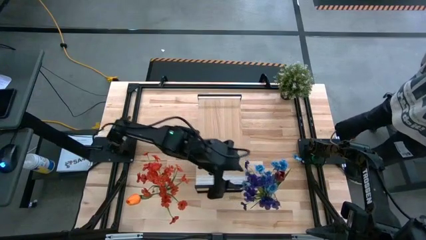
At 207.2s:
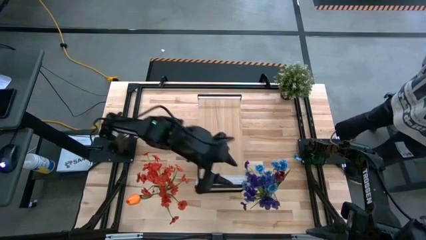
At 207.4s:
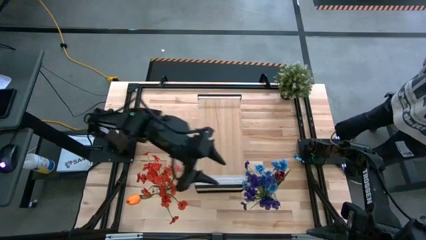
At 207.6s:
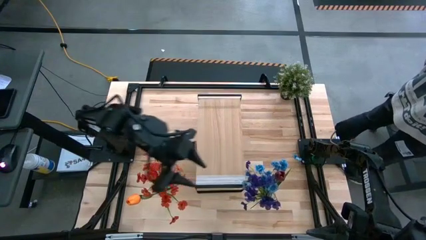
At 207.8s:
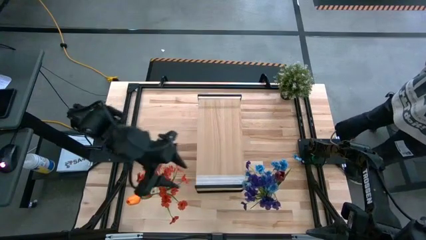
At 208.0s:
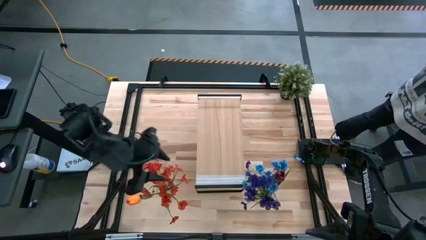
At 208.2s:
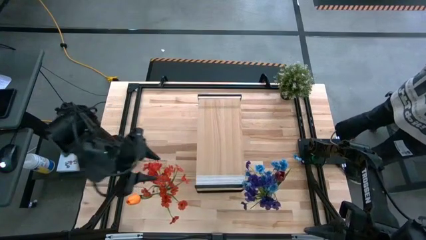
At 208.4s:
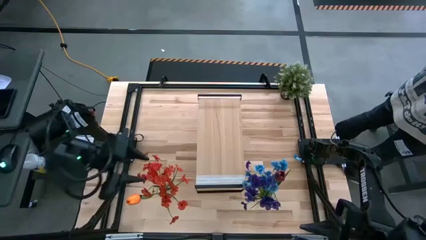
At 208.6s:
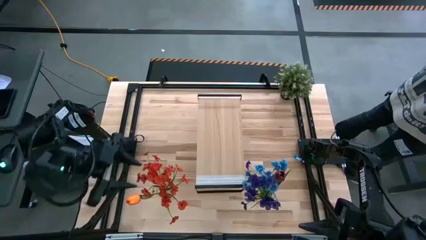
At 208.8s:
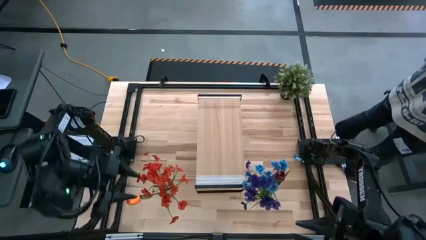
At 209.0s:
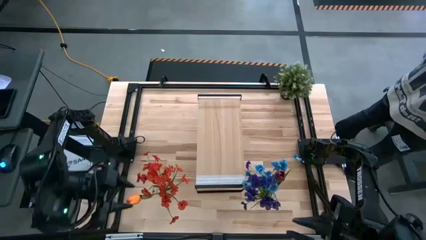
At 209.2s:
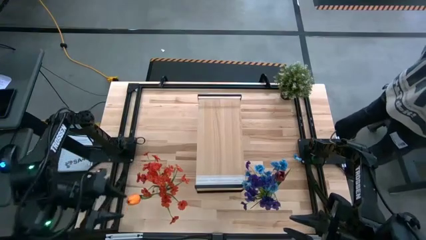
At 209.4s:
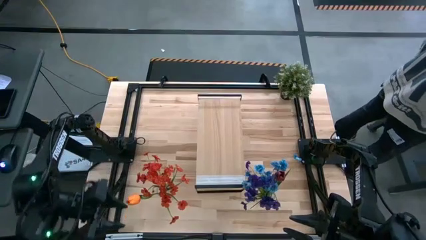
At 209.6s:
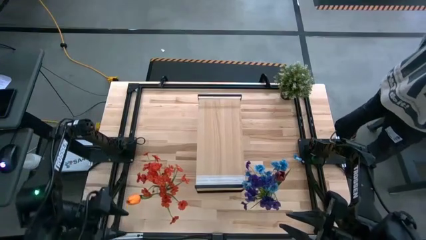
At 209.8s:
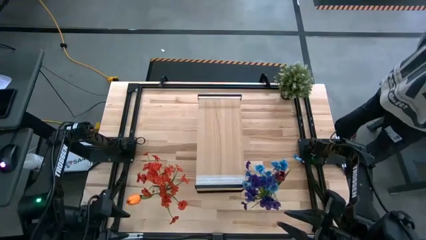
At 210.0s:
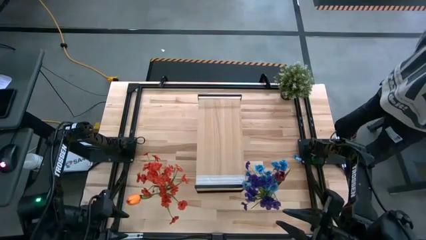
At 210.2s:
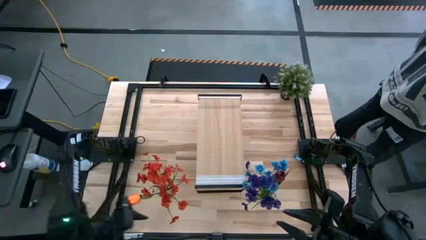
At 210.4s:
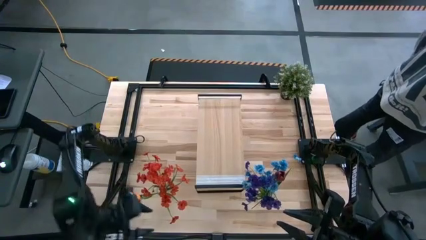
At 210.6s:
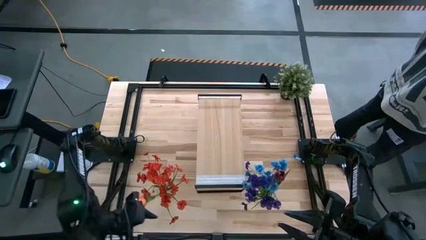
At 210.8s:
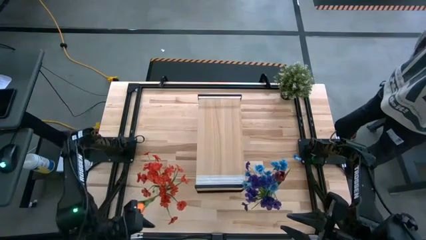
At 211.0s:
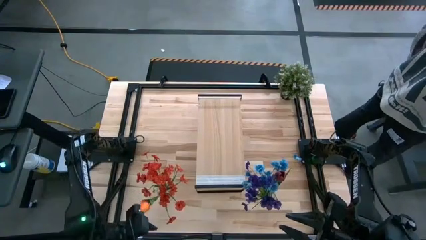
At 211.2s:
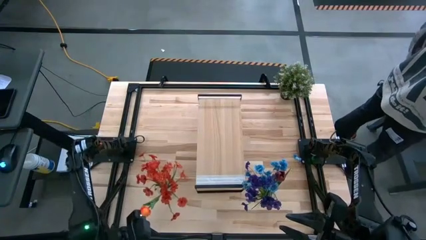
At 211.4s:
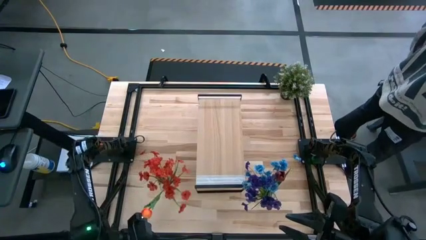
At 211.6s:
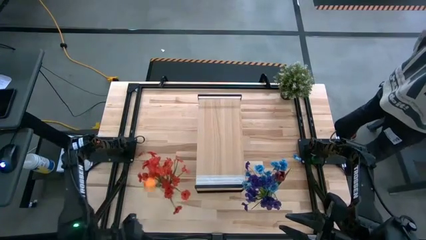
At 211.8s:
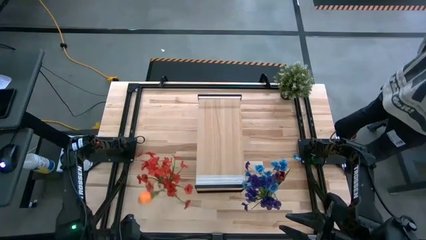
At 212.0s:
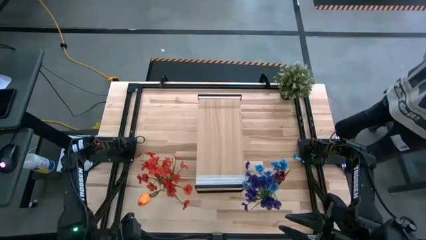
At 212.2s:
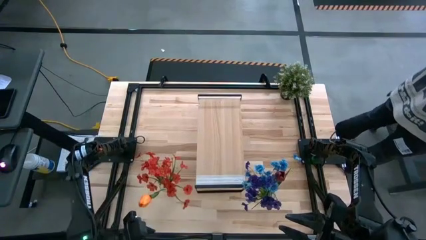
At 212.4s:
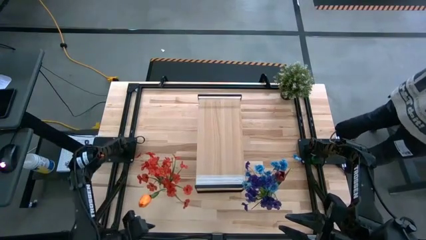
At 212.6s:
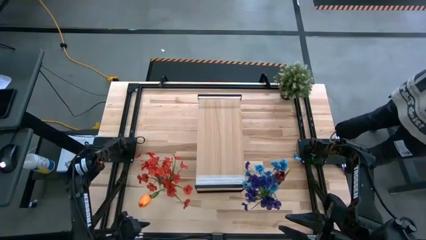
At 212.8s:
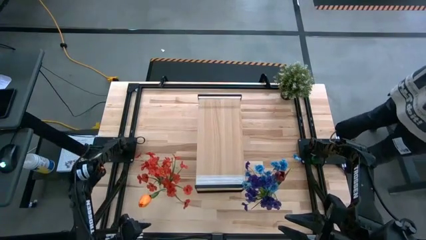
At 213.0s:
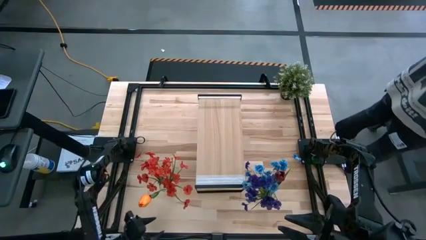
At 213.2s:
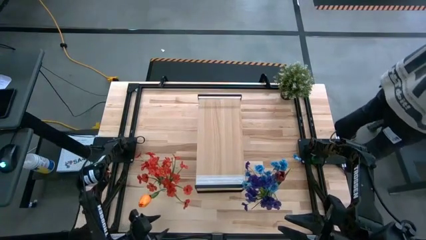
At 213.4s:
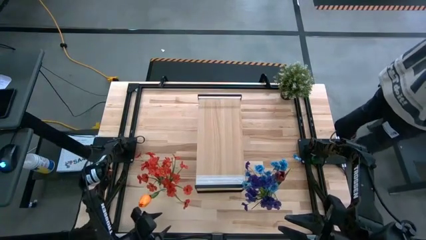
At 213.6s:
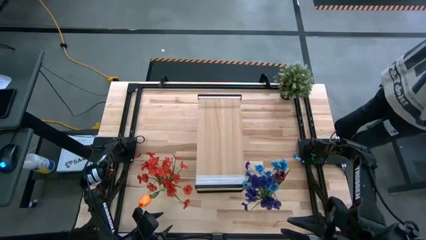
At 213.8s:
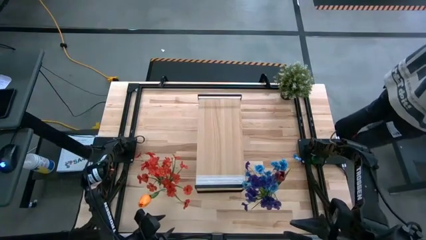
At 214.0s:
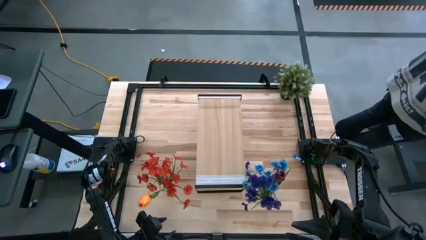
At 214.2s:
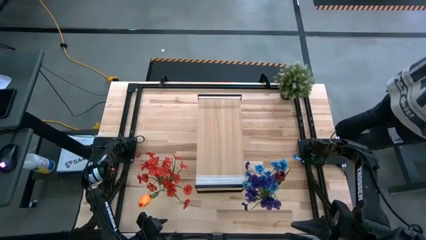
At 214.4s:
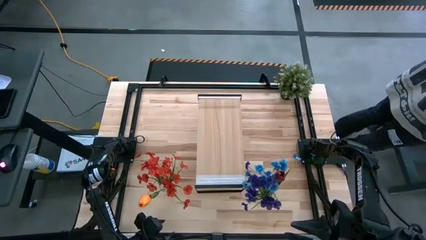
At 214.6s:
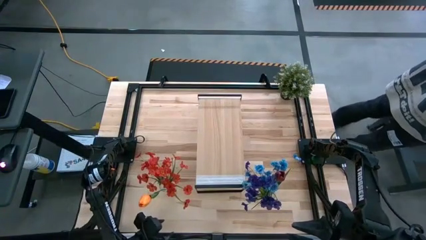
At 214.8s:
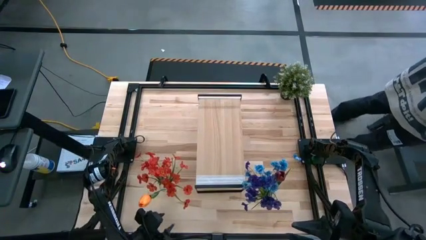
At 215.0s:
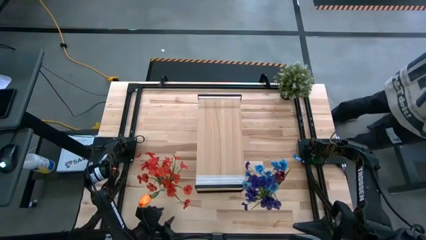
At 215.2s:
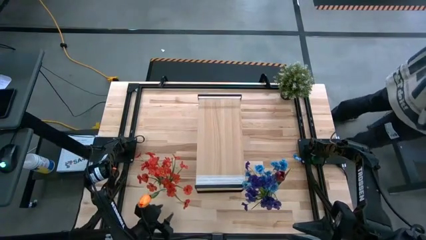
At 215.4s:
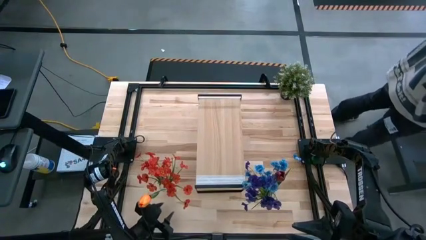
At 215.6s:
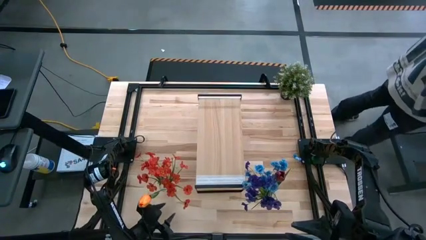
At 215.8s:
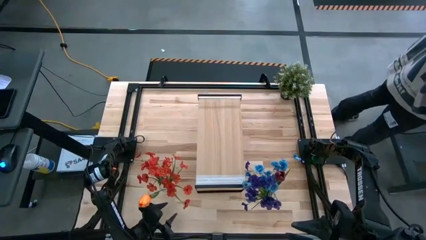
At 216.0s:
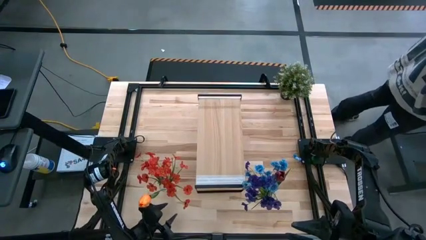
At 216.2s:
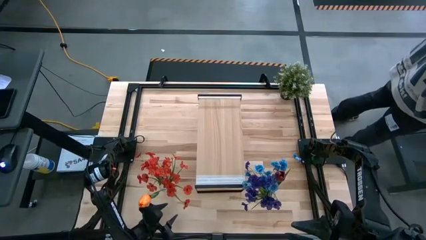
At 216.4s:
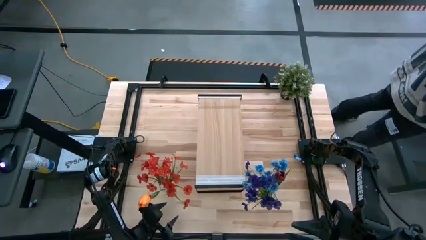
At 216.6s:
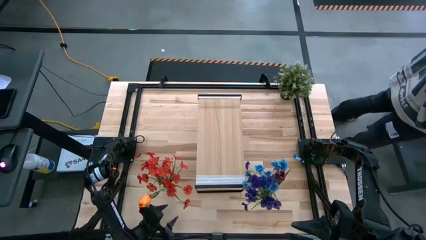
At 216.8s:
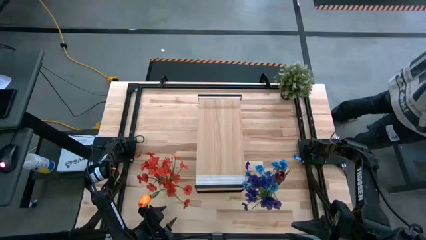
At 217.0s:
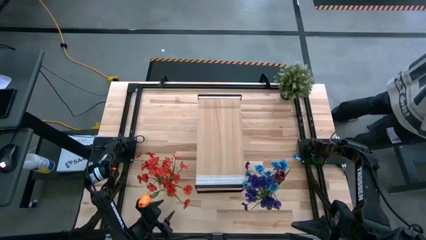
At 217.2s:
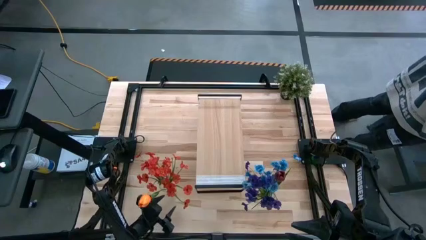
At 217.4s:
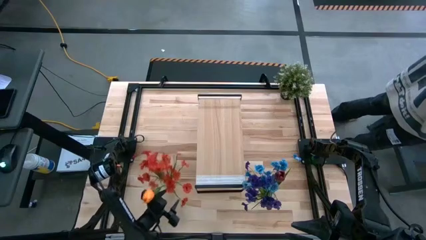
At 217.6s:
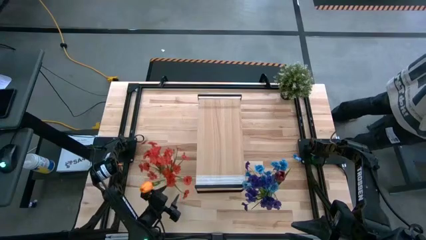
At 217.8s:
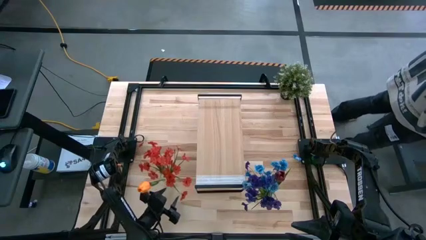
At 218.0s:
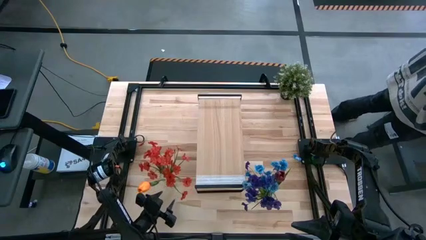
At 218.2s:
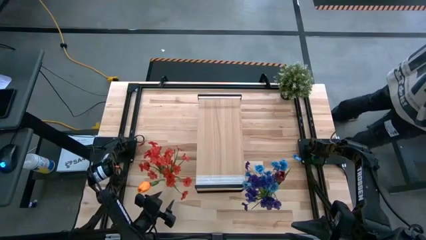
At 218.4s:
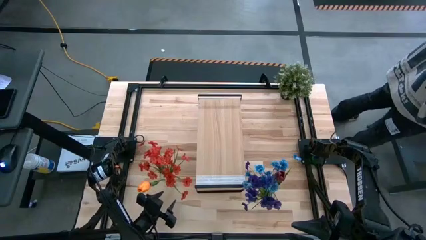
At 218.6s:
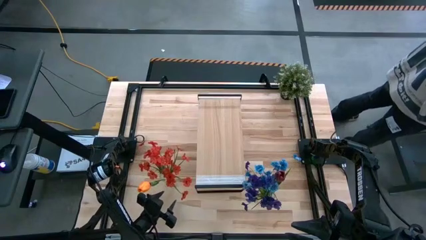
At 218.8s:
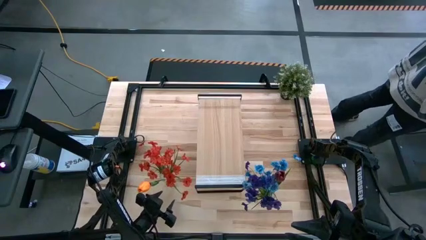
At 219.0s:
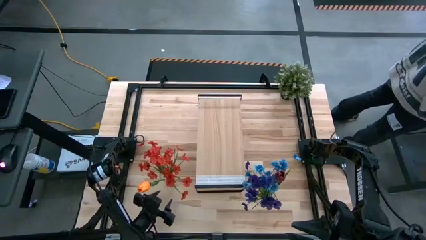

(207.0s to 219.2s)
Task: Pick and place flowers into a vace then onto a shelf
Put the left transparent vase with flowers on the shelf

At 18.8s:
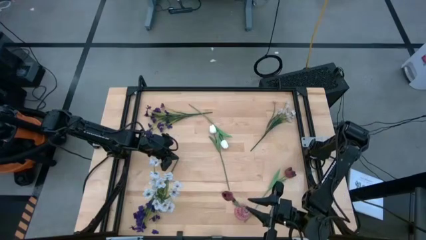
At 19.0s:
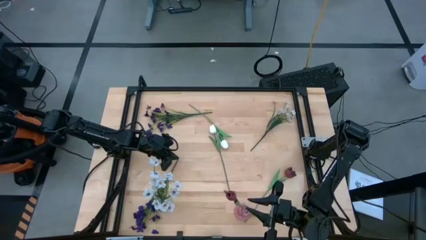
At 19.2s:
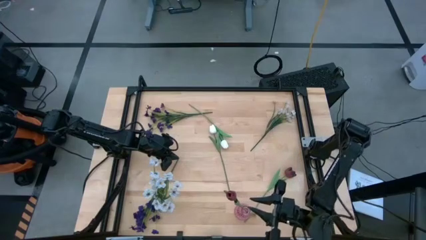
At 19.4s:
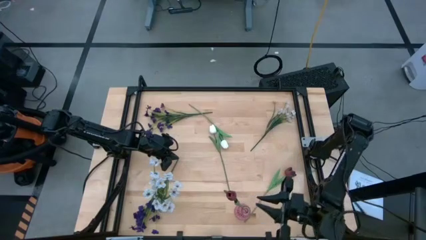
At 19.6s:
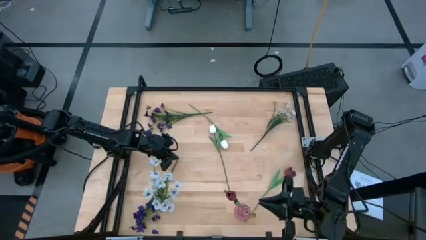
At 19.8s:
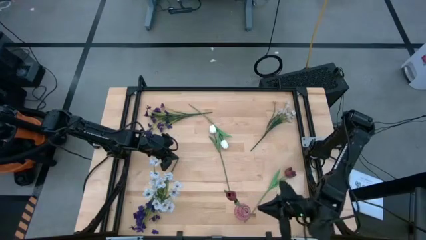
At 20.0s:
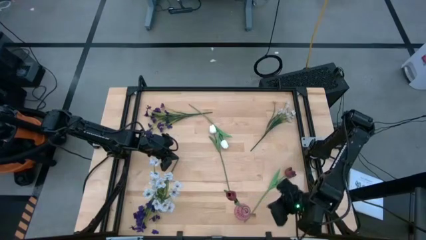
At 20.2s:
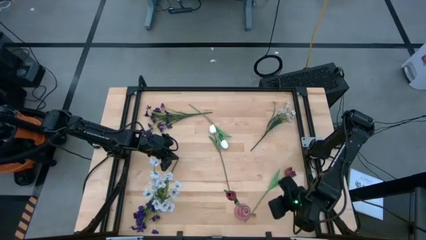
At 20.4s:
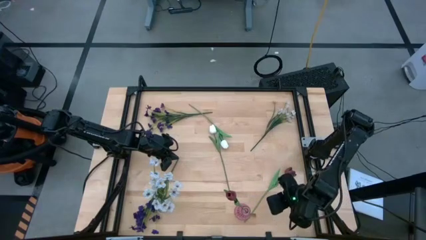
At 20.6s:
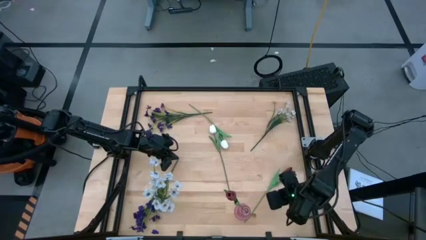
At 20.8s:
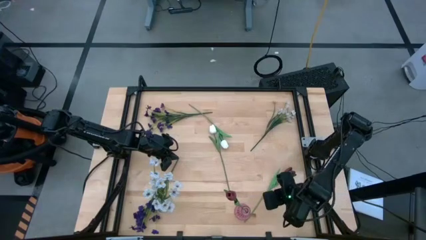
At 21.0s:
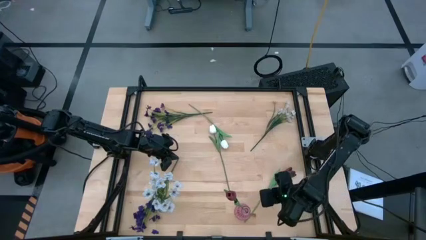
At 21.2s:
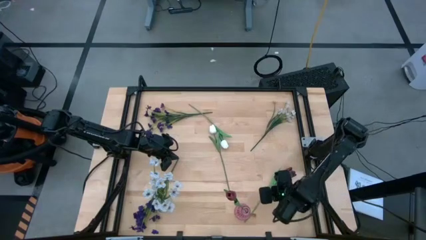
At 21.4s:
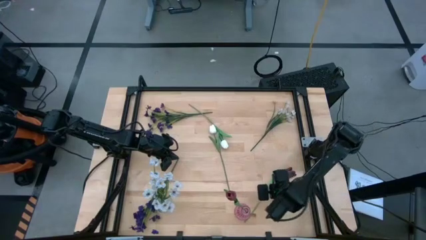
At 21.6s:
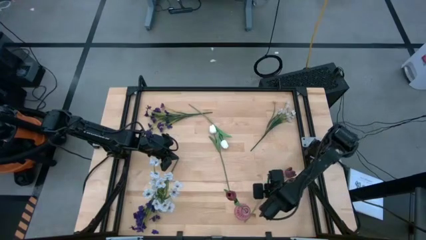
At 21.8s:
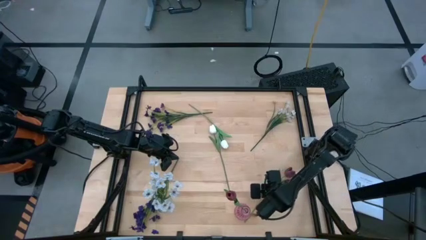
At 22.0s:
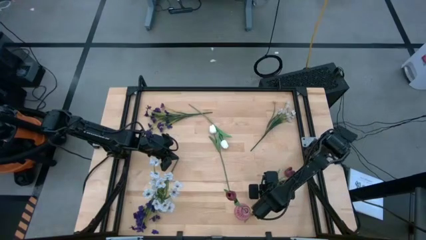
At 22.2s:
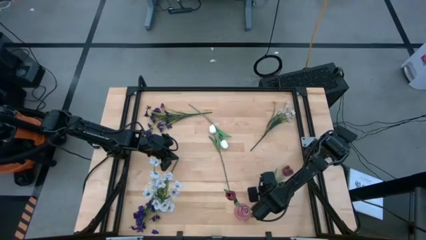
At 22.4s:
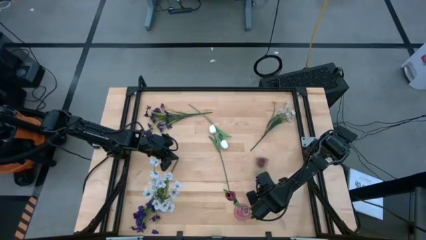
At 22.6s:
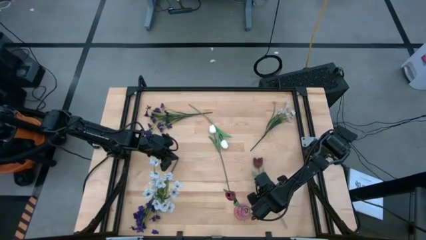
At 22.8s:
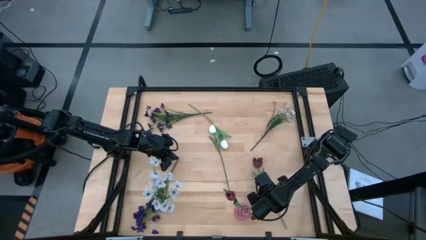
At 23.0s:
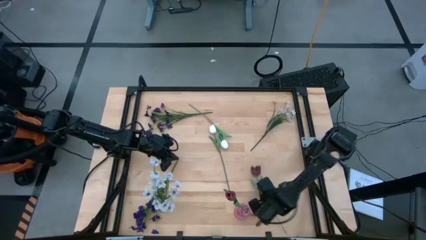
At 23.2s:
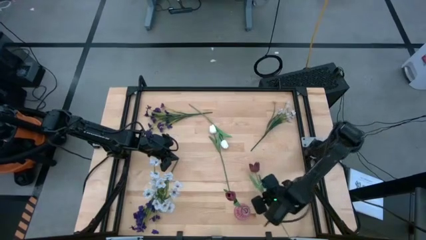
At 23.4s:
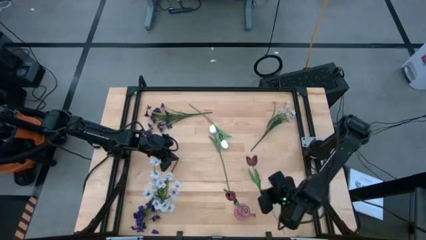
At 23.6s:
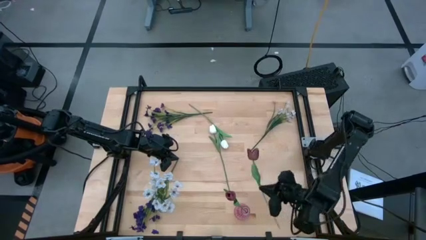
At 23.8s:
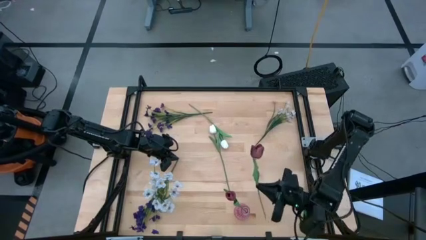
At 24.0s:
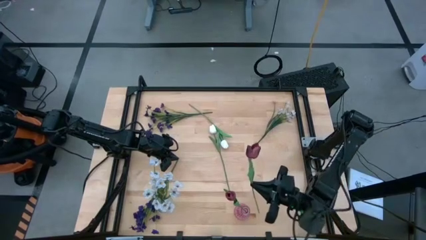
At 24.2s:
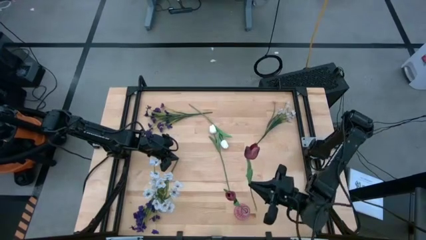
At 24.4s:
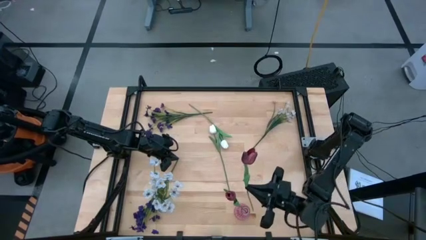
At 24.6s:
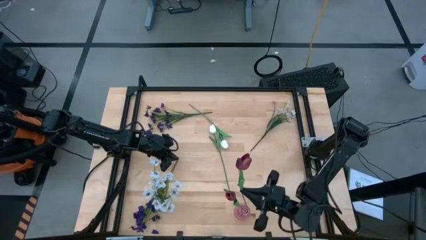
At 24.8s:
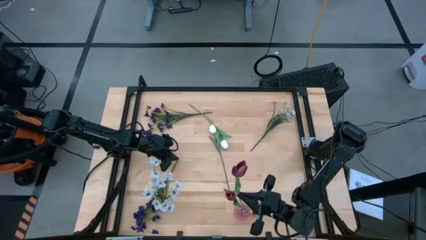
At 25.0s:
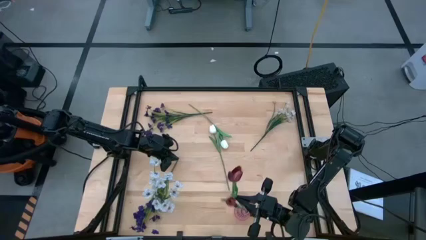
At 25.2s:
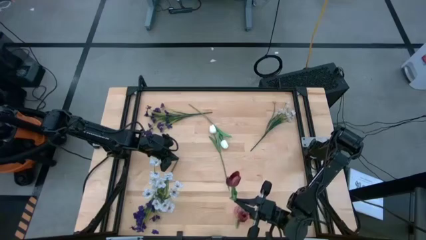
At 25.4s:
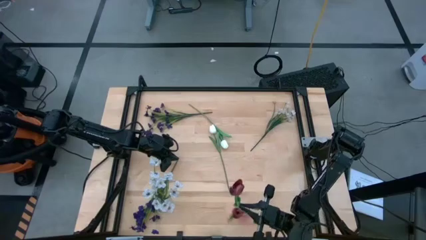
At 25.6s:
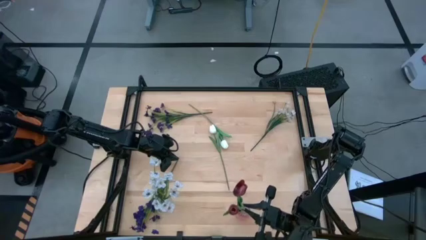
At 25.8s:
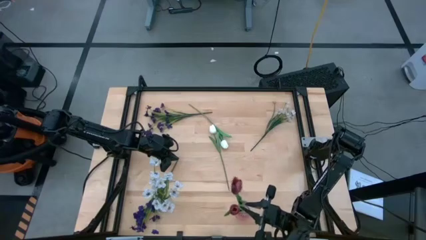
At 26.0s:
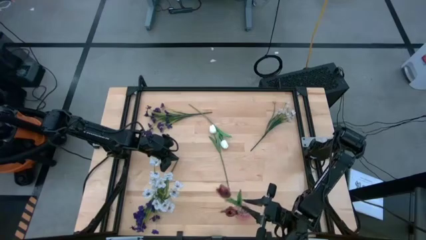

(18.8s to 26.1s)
Task: Sort flowers into vase by color
Put the red tulip into the pink vase
